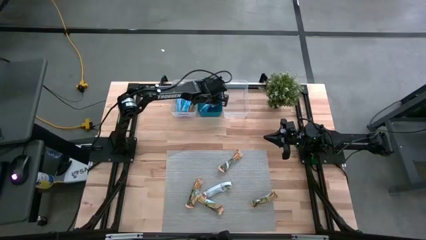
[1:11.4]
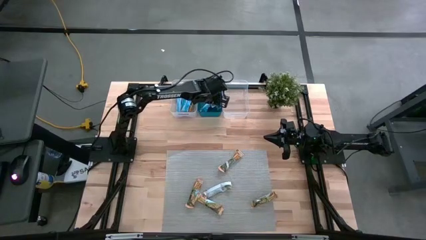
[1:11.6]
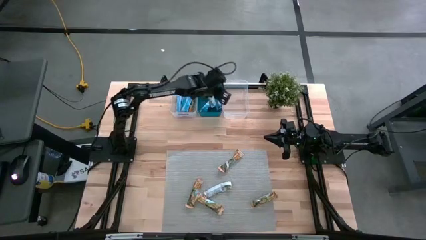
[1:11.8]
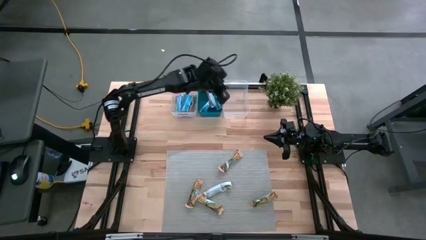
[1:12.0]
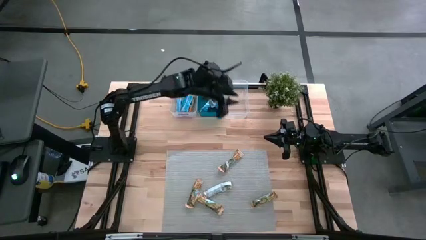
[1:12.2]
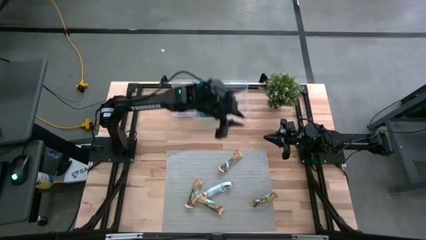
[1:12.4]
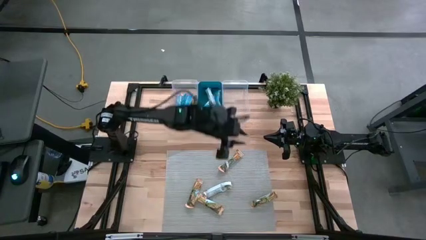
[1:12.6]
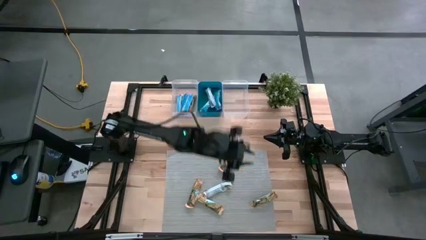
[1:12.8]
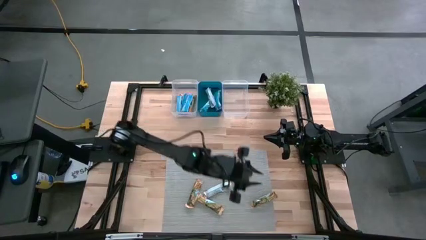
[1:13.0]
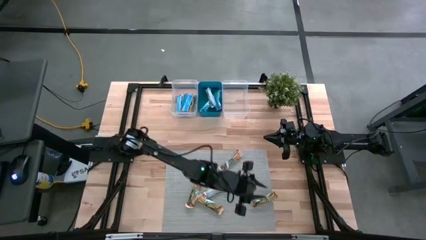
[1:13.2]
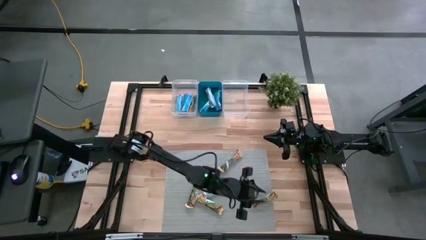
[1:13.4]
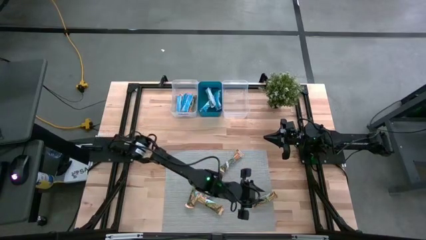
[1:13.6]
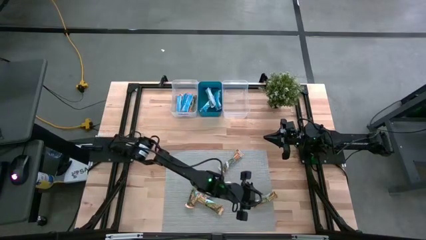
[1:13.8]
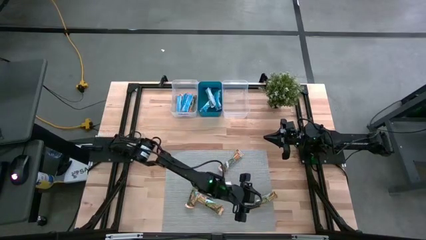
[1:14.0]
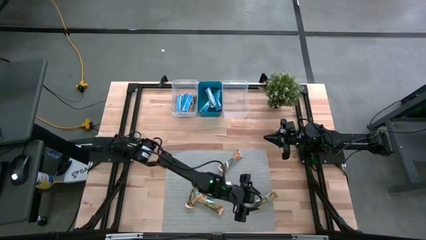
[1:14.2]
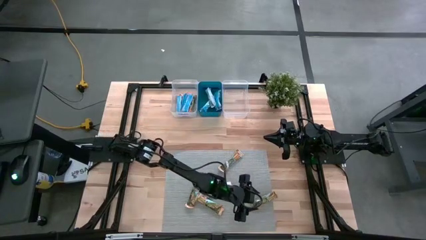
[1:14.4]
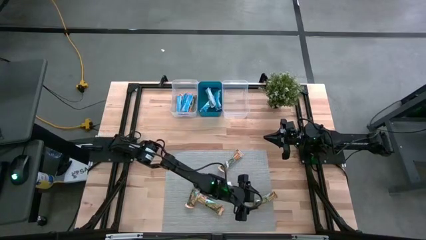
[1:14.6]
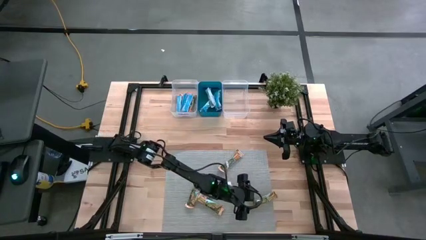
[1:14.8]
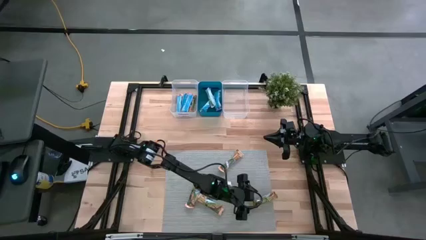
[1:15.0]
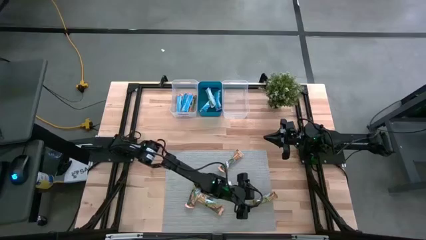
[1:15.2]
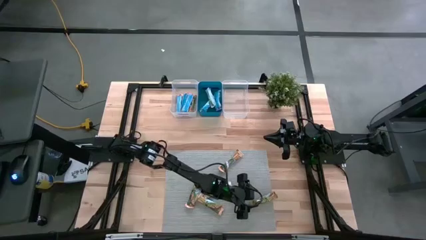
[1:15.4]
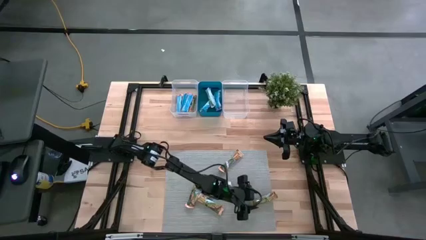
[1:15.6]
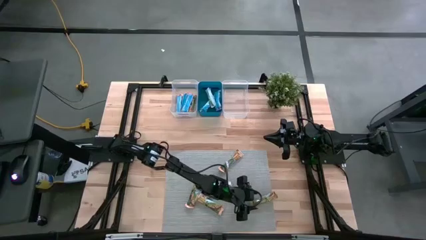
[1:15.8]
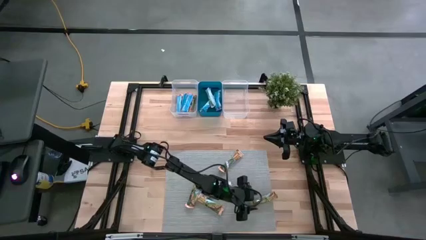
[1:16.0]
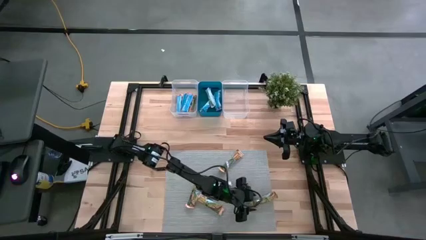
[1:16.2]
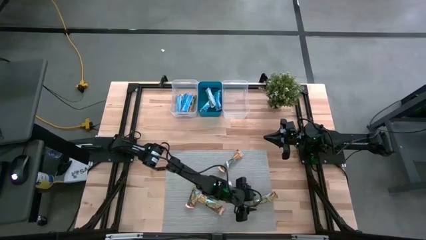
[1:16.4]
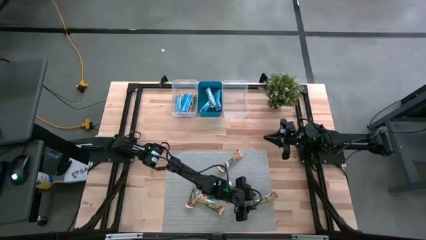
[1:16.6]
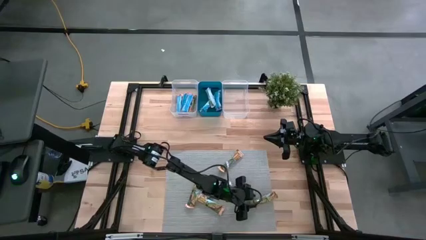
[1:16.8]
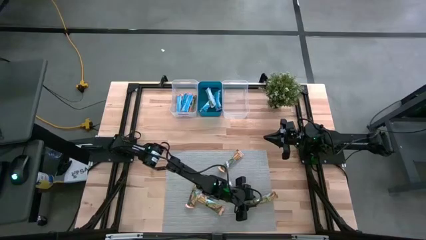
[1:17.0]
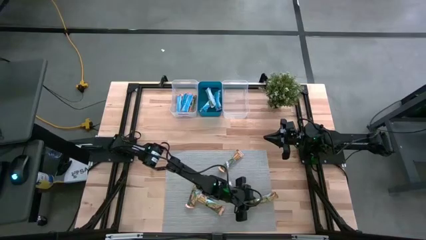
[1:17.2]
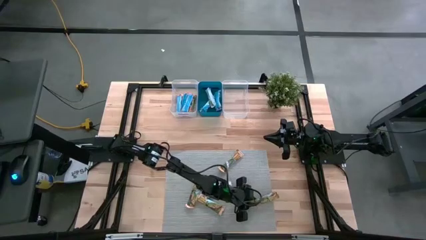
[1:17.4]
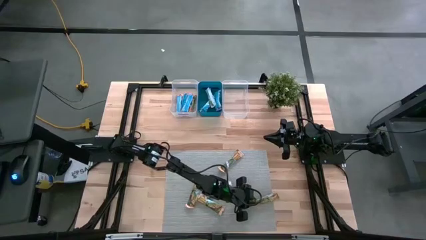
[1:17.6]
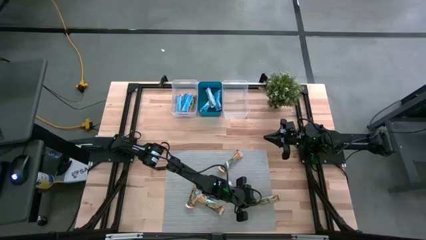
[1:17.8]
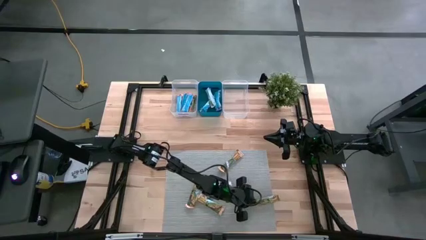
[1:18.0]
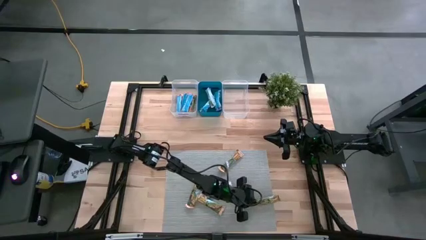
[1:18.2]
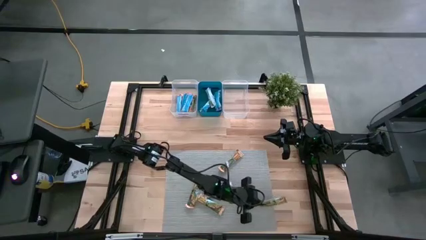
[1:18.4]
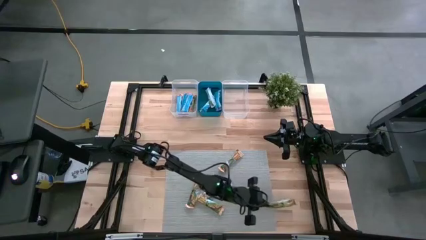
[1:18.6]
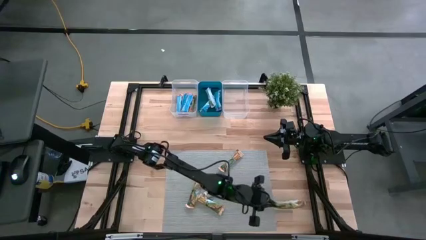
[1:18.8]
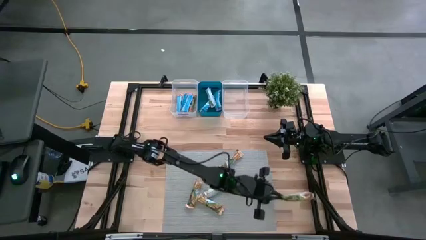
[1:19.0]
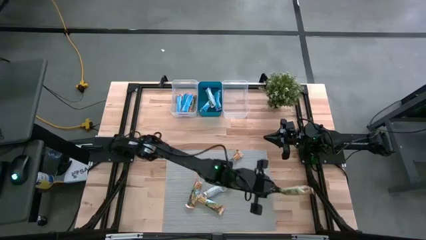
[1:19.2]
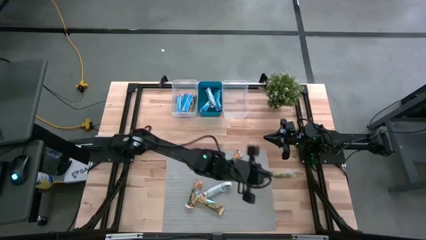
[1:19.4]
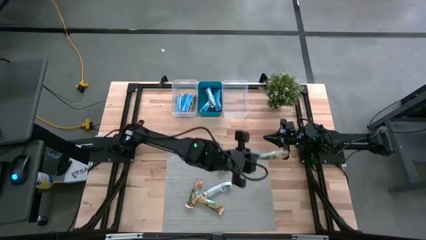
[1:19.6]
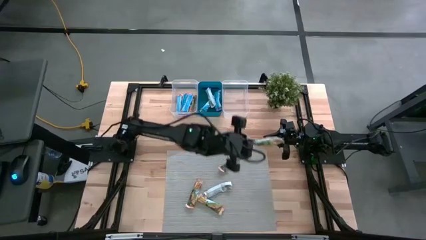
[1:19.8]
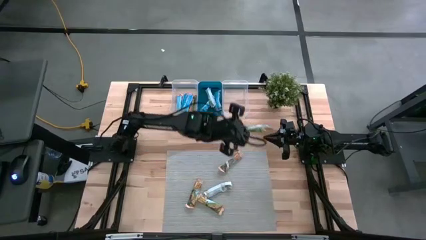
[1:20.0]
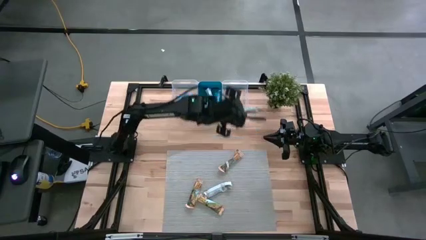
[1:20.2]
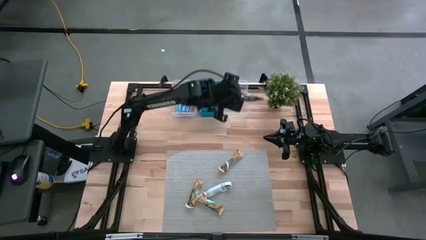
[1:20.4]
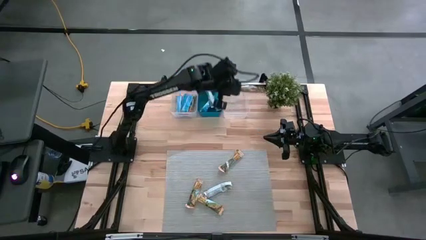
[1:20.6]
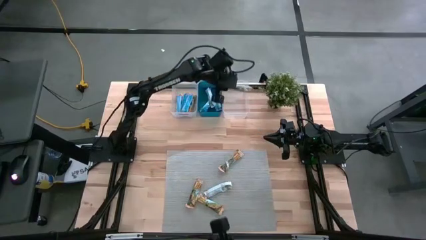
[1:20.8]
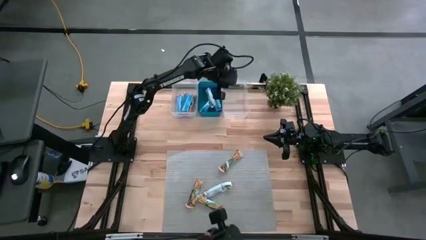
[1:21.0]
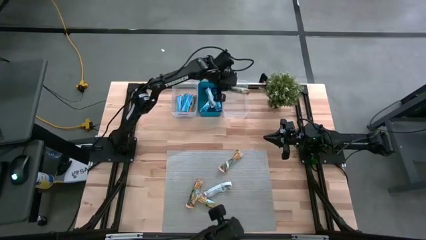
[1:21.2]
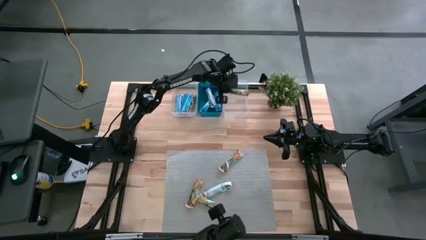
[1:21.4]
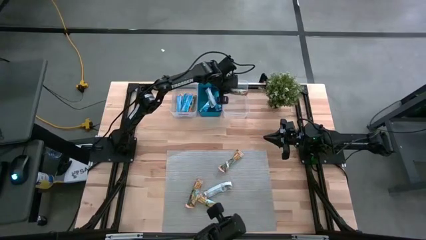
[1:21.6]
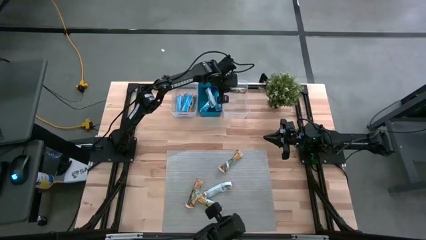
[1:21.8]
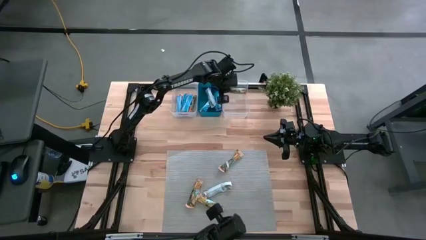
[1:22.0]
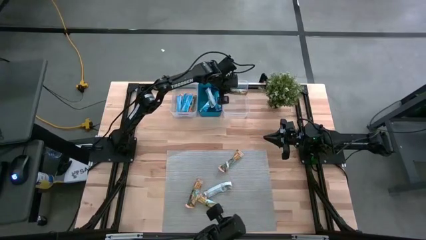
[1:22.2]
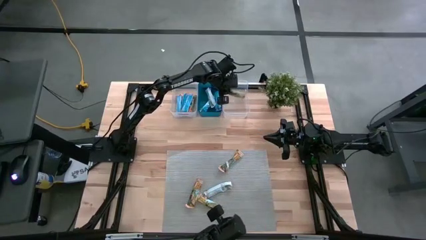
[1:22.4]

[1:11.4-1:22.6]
Task: Pick and place Granola Bars by type
Put the yellow granola bar into the right transparent bin

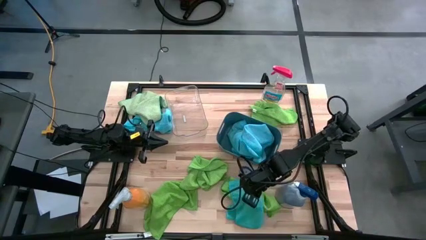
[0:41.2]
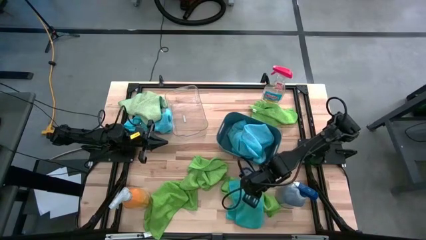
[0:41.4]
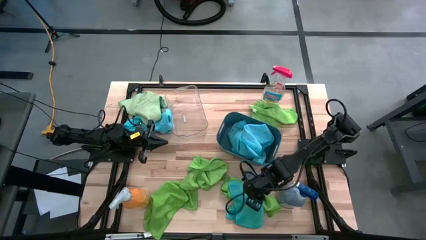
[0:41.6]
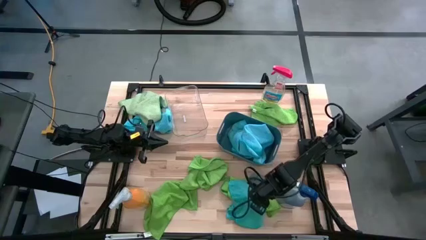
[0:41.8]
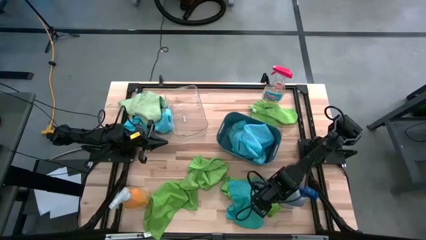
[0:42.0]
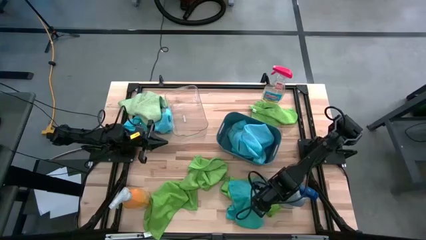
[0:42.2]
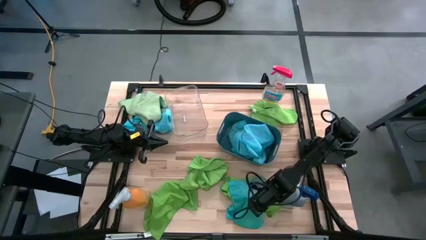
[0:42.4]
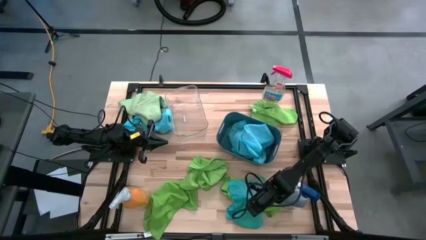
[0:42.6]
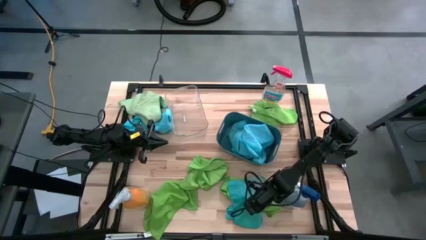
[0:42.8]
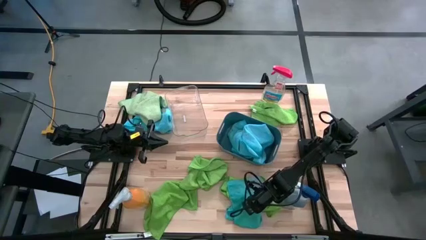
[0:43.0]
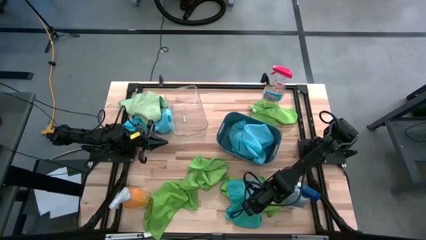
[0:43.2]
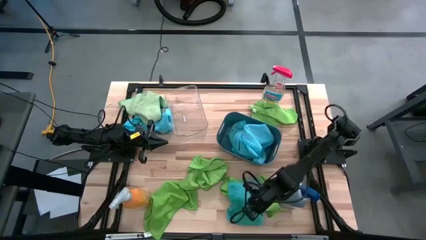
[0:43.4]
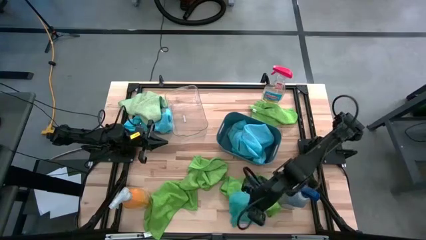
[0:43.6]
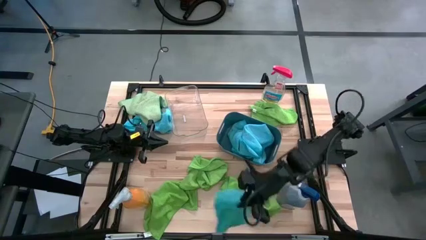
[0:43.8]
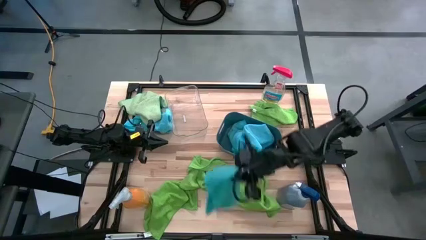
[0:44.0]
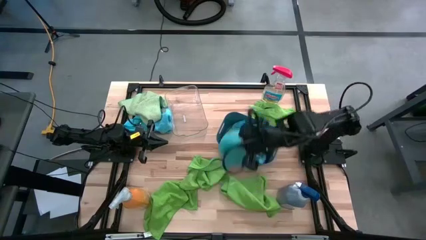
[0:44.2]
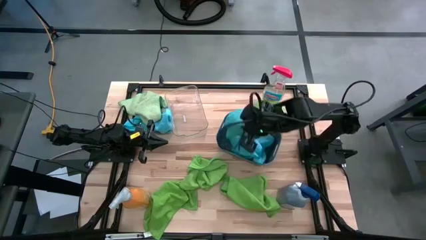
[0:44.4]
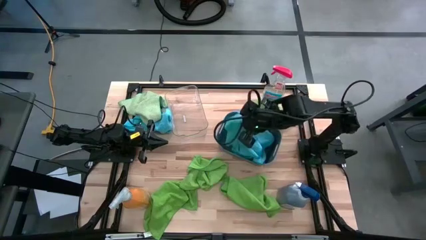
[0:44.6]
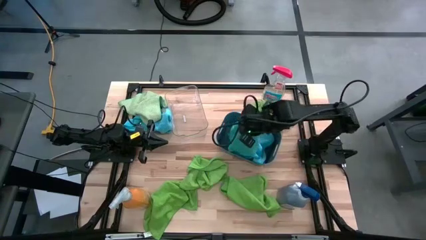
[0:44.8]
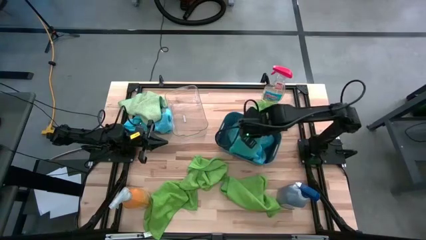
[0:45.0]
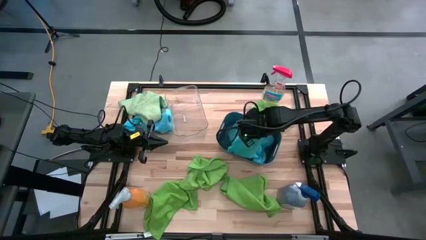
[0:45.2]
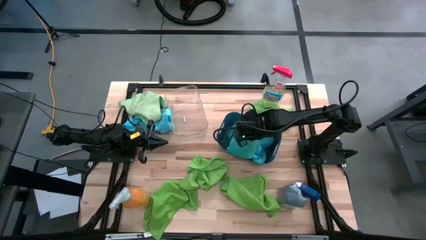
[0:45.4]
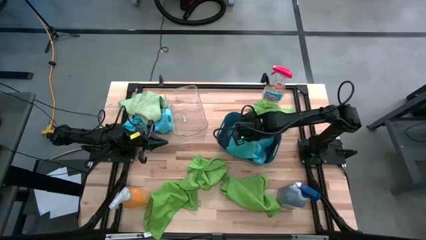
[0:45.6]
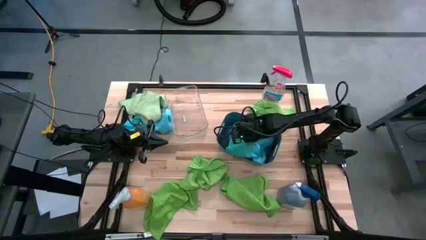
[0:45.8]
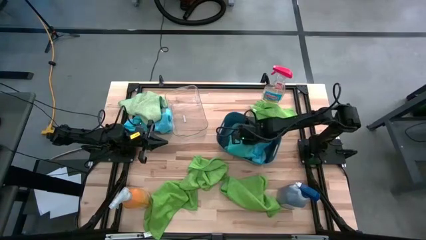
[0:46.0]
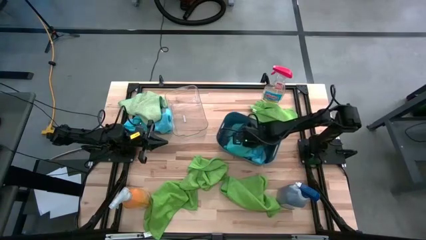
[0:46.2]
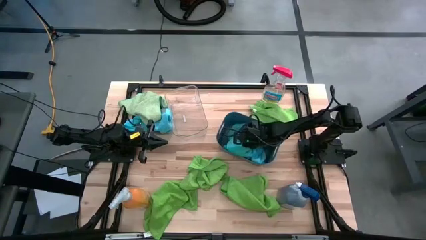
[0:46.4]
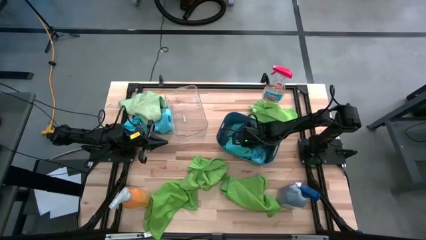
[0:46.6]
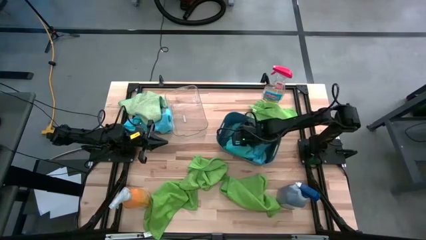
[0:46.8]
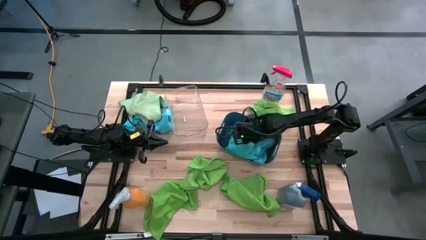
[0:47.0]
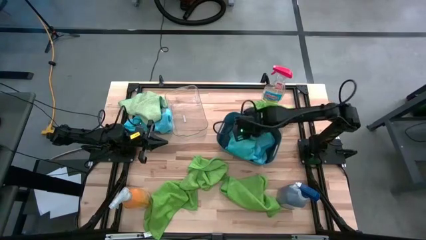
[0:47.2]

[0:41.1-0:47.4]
Task: Sort microfiber towel by color & place in baskets
Put the blue towel into the blue bin
